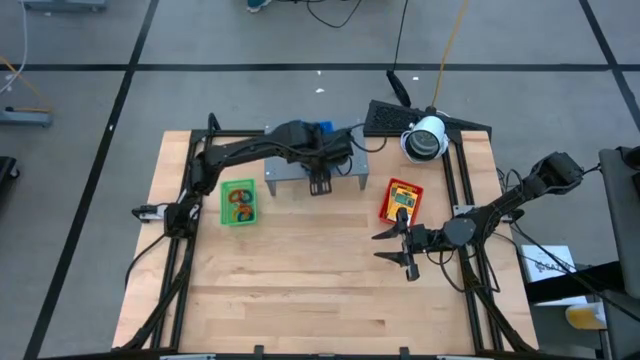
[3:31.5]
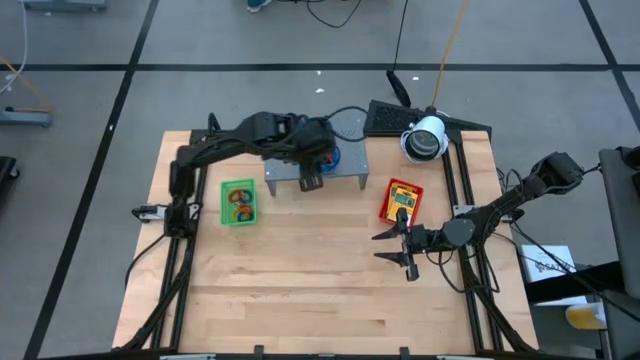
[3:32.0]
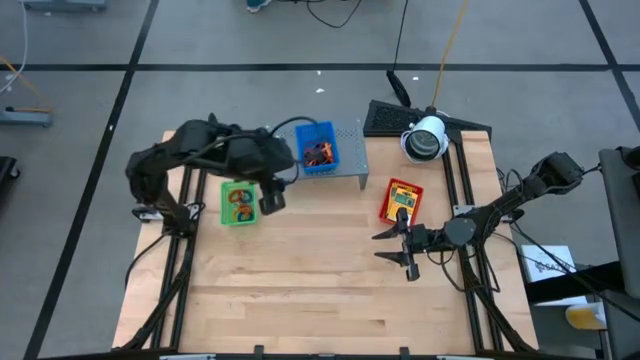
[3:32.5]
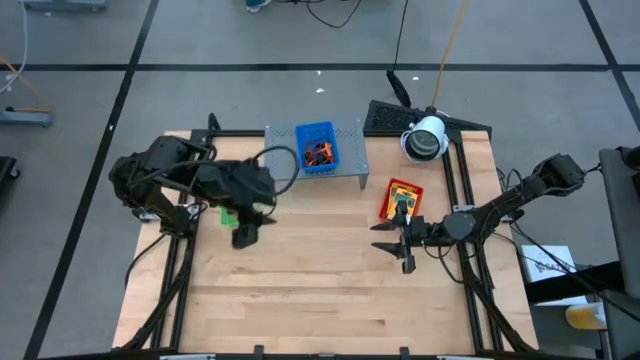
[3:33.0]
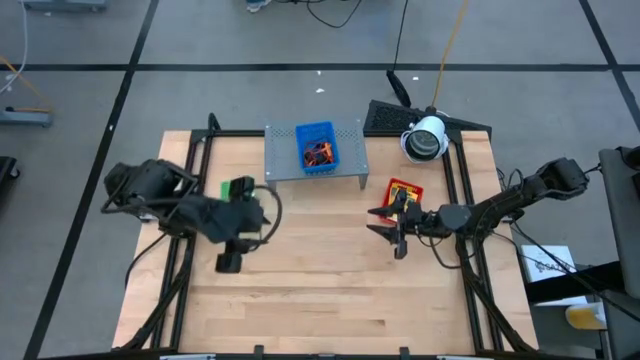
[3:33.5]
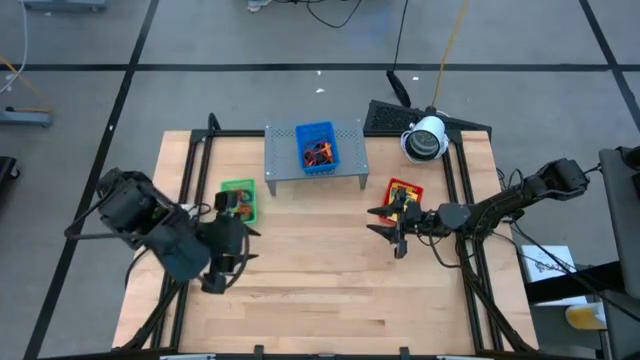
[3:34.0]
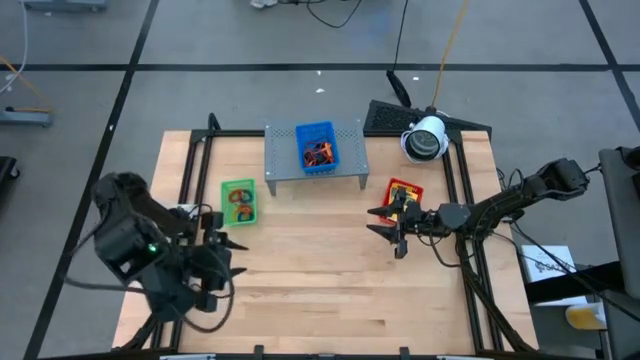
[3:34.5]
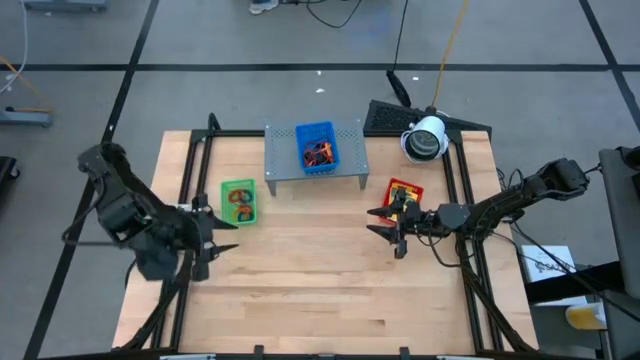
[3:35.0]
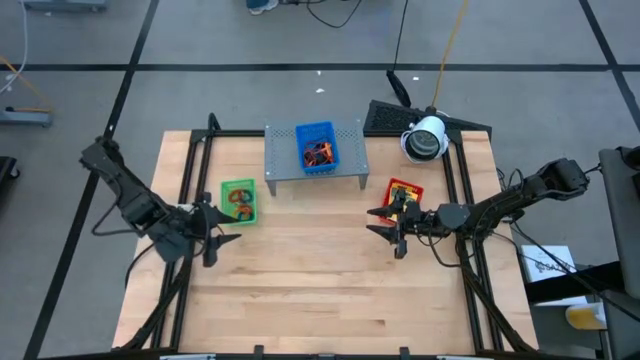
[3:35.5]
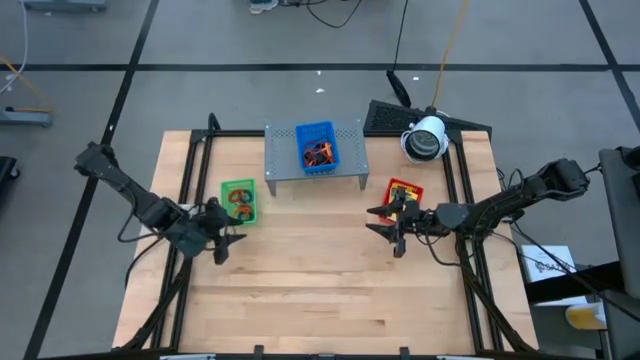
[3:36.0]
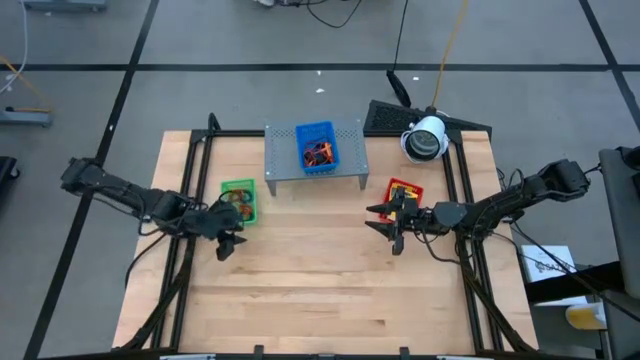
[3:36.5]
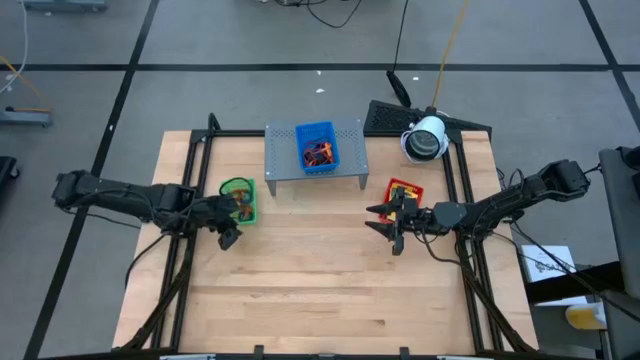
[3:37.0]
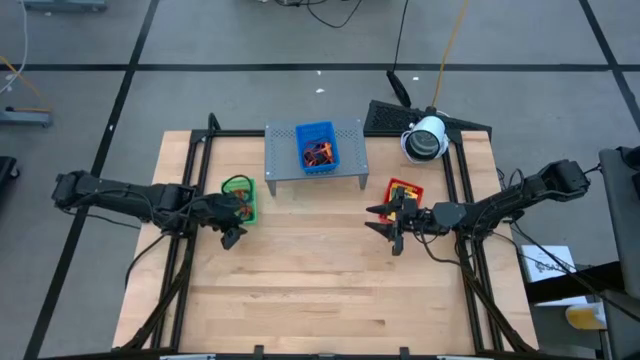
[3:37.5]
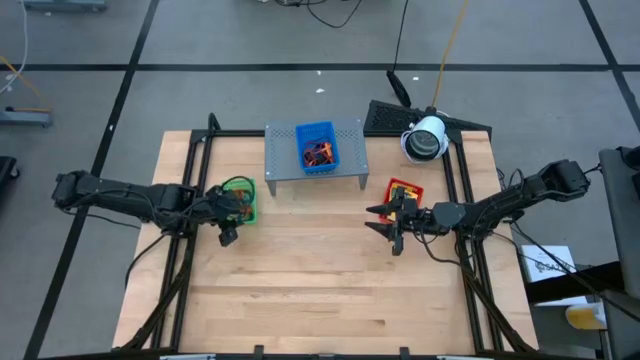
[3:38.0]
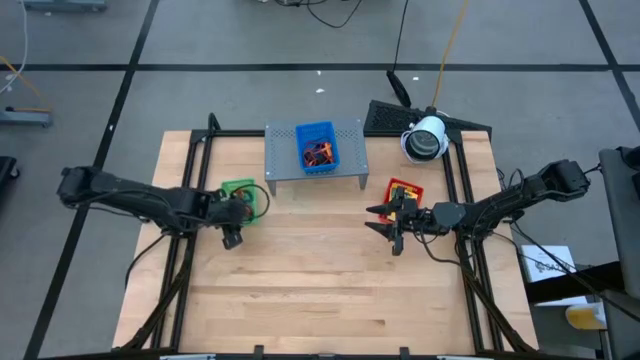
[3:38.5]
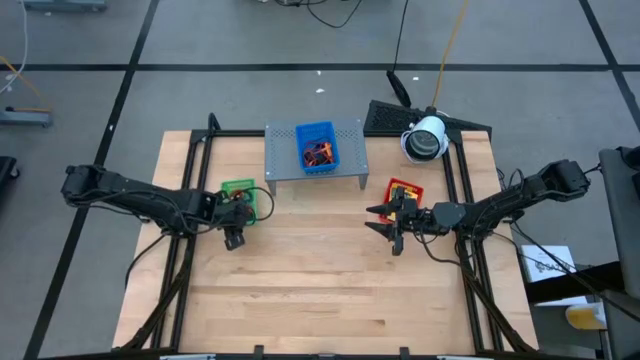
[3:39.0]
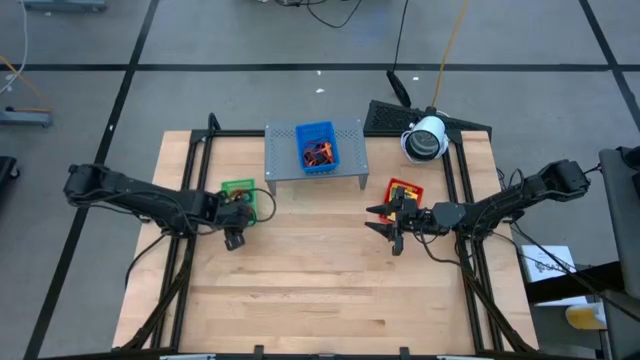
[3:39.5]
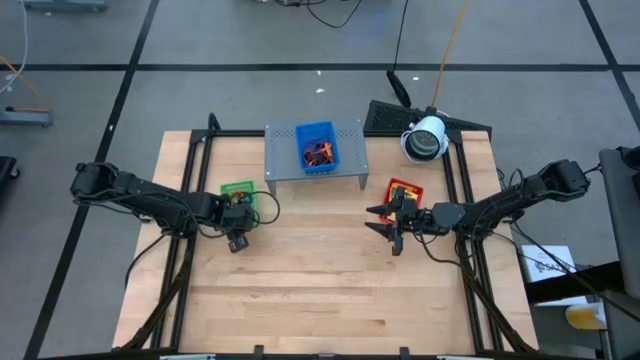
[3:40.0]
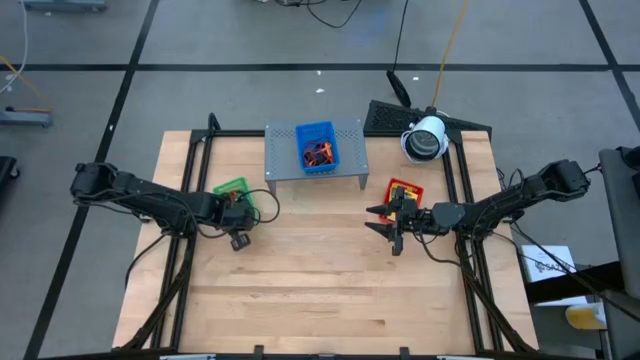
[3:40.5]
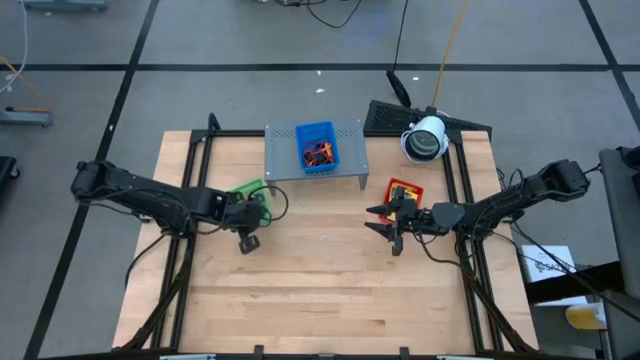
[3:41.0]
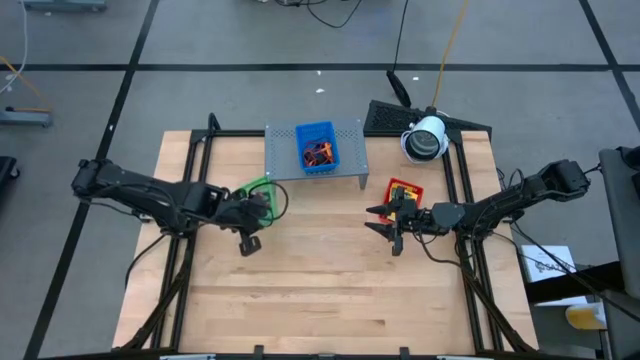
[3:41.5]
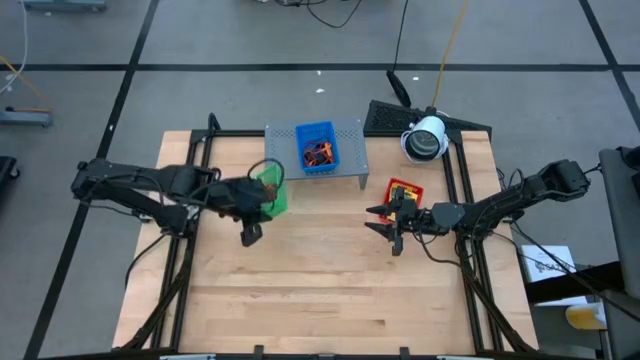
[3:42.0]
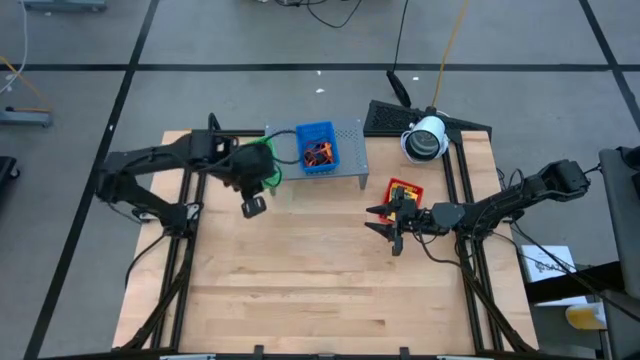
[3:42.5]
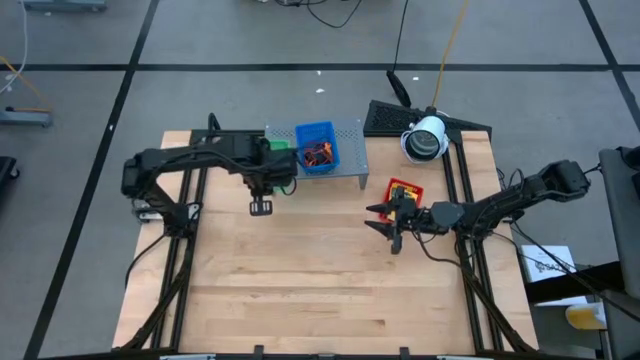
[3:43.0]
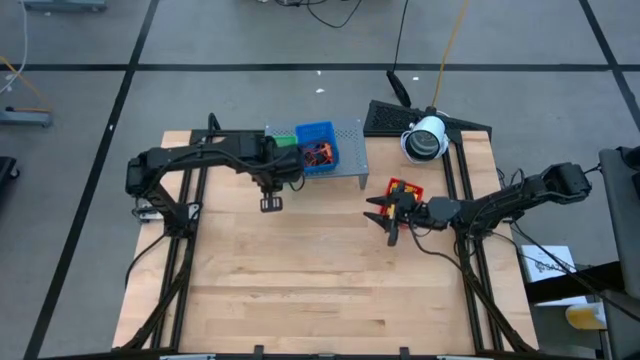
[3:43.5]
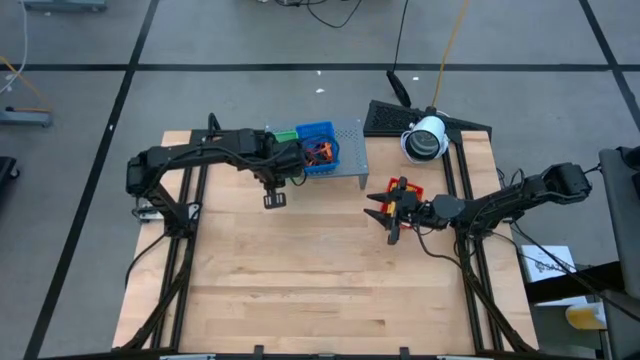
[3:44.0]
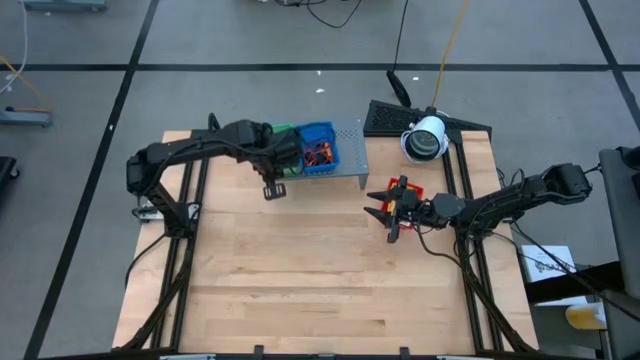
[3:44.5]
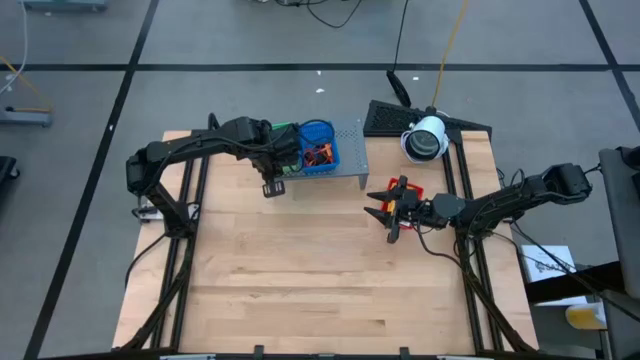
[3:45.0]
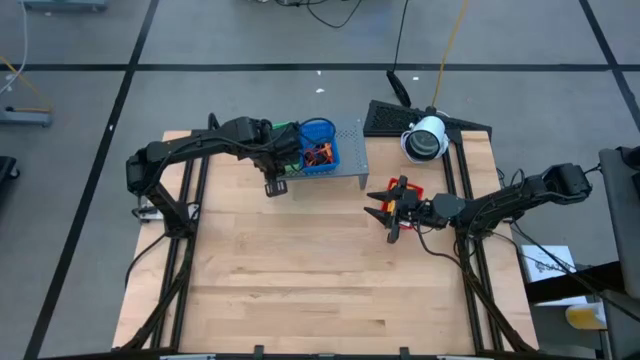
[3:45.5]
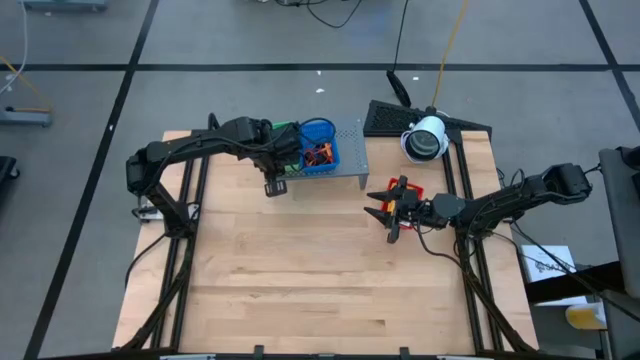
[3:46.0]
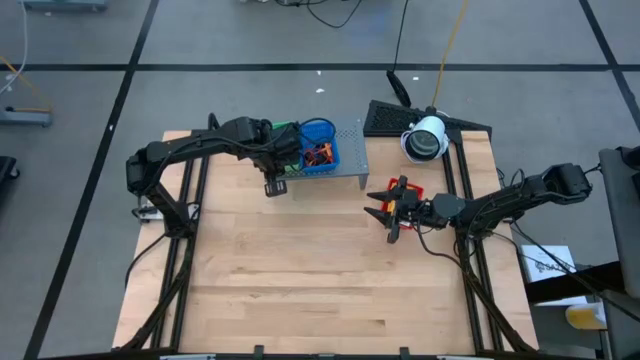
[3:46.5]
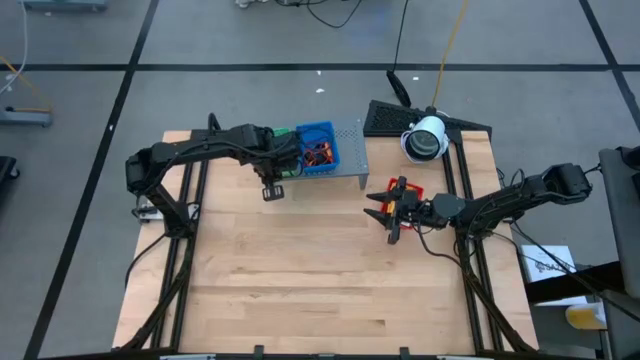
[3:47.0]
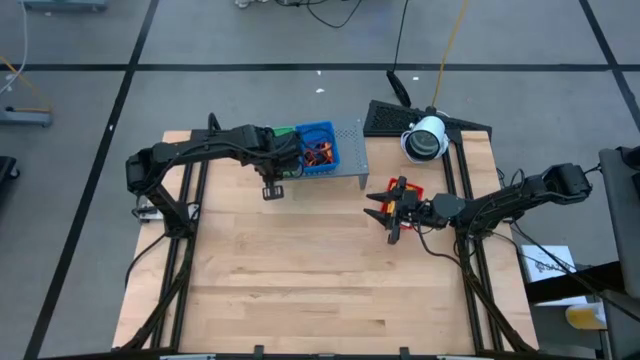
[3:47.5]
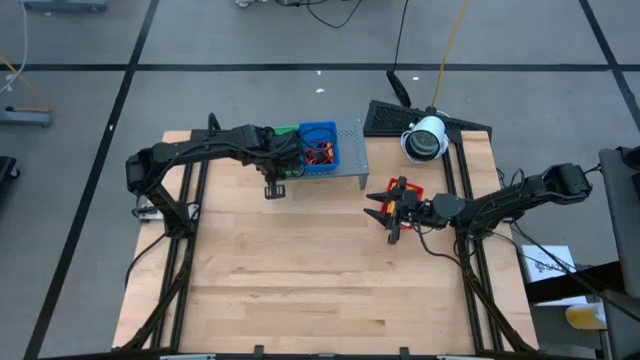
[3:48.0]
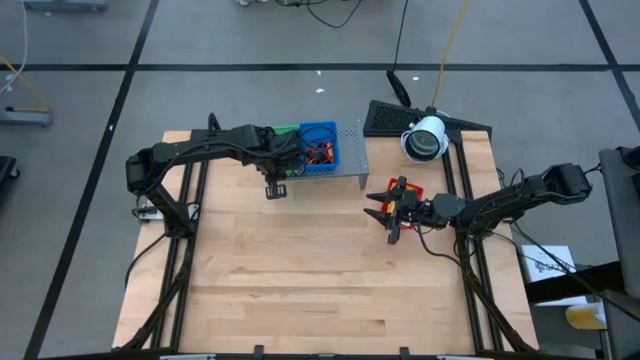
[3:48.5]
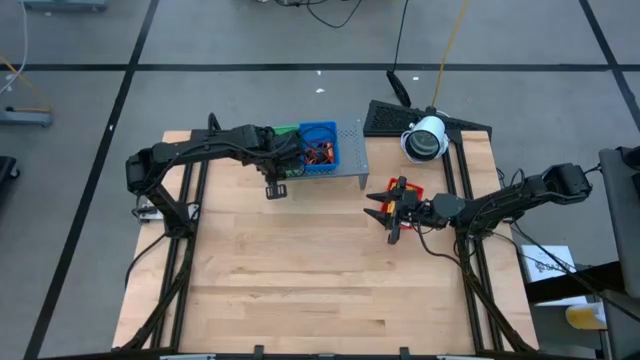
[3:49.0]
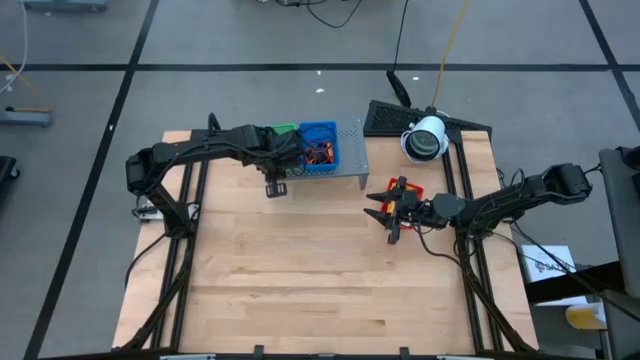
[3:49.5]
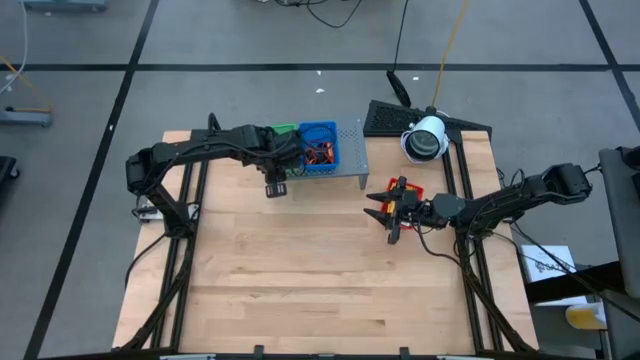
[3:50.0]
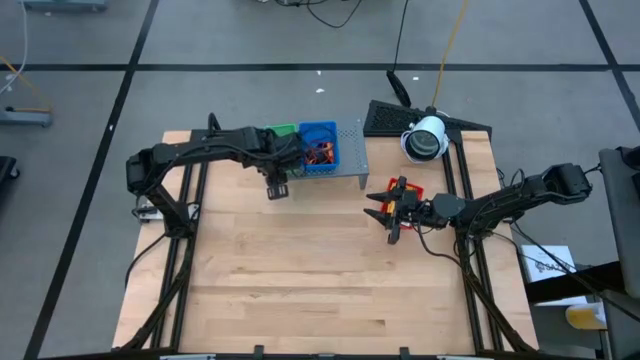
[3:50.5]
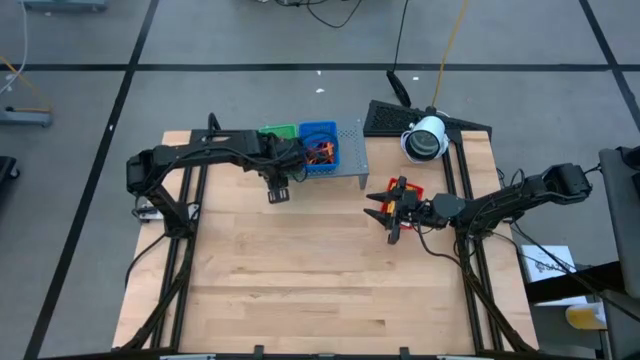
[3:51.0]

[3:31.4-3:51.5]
Task: Pick & Place Office Desk Supplies
Put the green bin on the shelf

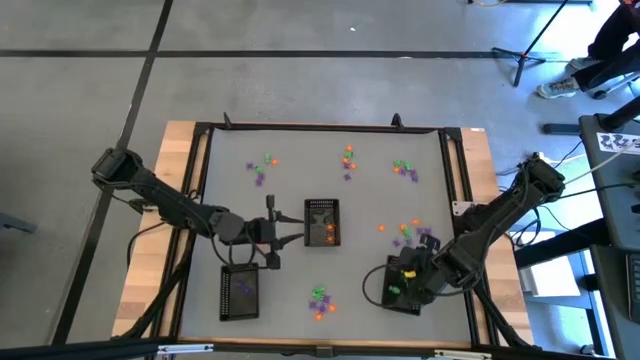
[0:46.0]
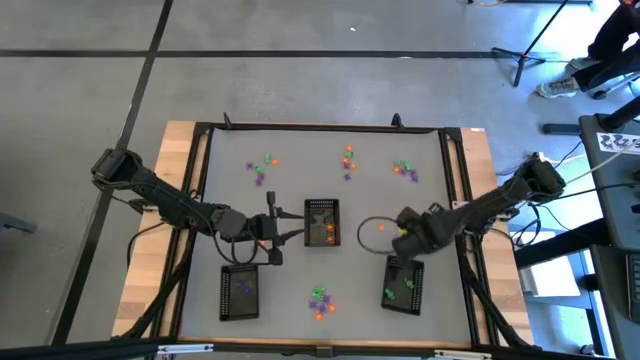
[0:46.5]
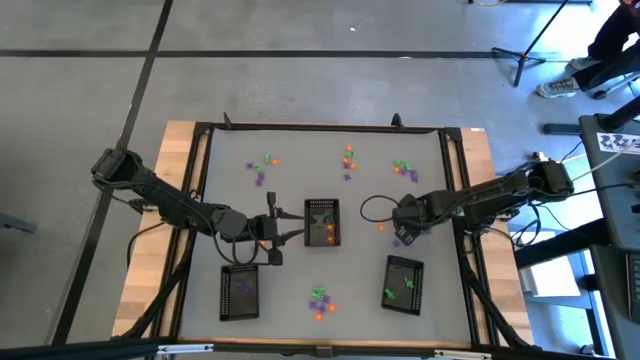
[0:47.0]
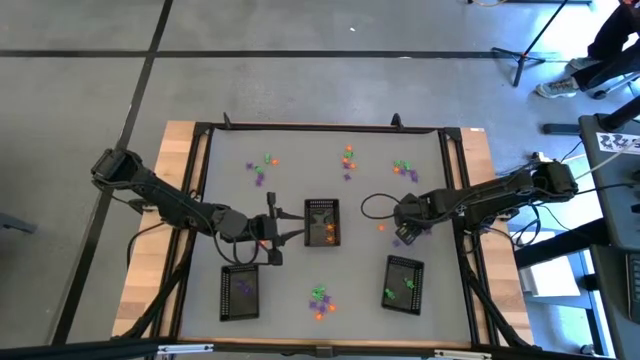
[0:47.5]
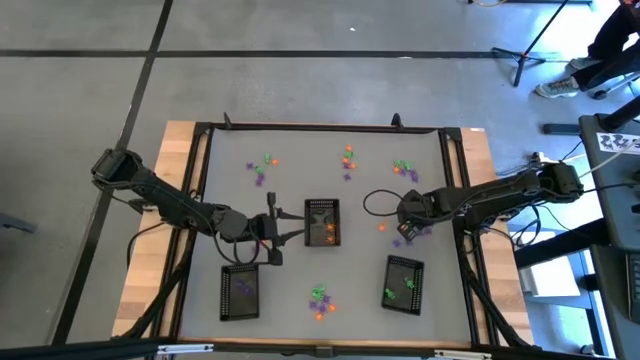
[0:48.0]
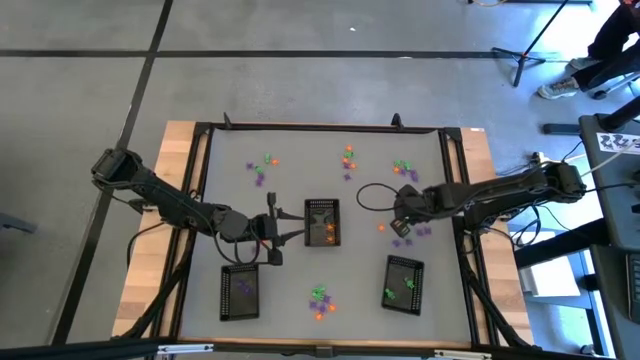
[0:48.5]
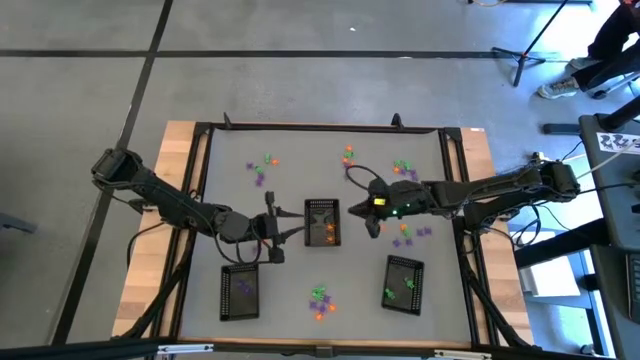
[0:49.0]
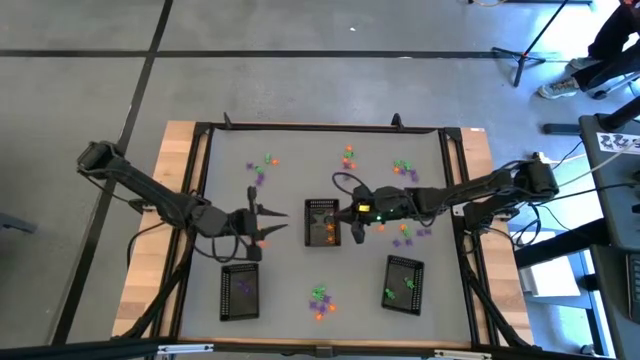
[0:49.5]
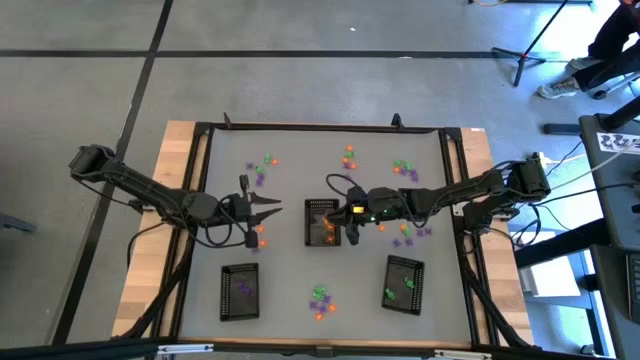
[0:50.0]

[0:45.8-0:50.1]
Task: Sort Halloween decoration
Put the orange spider toy into the top black bin
